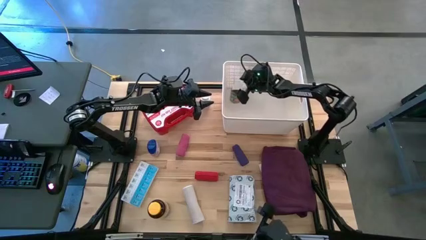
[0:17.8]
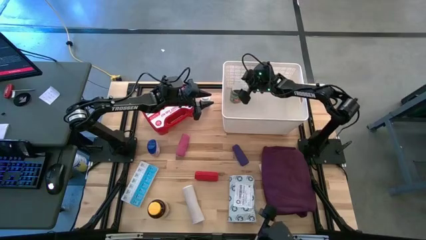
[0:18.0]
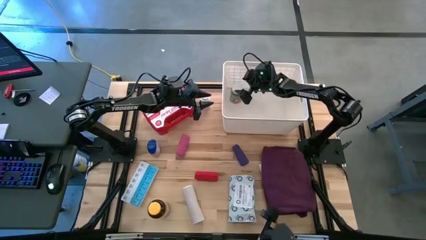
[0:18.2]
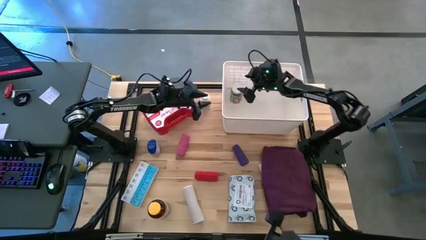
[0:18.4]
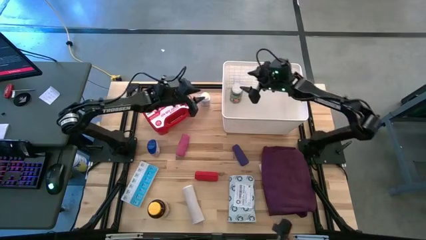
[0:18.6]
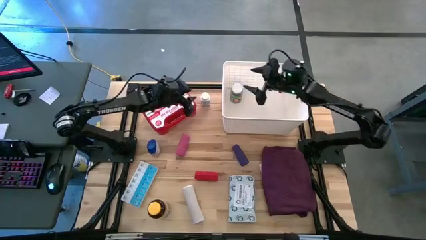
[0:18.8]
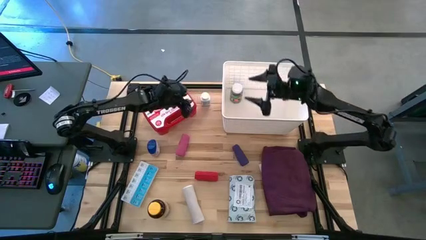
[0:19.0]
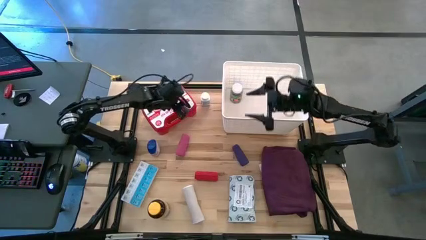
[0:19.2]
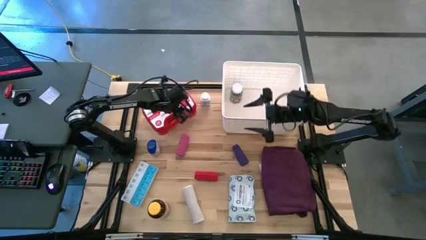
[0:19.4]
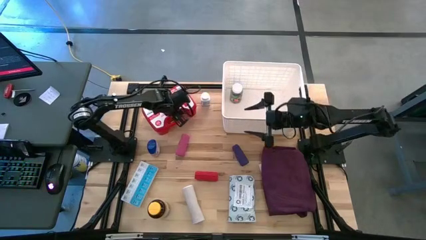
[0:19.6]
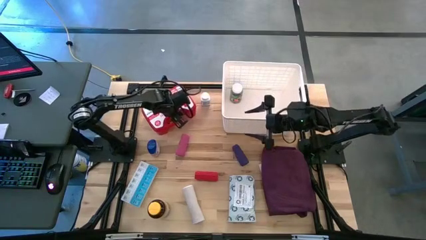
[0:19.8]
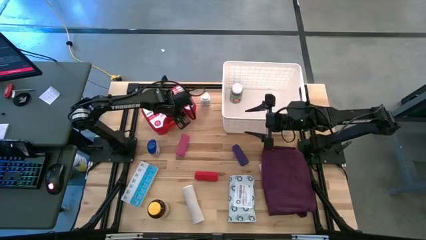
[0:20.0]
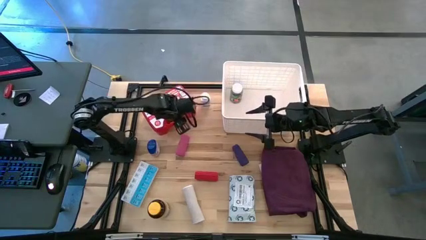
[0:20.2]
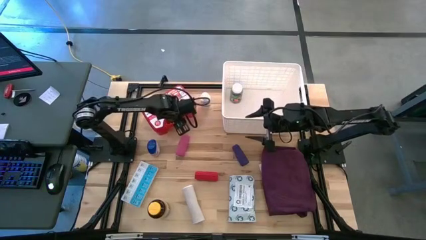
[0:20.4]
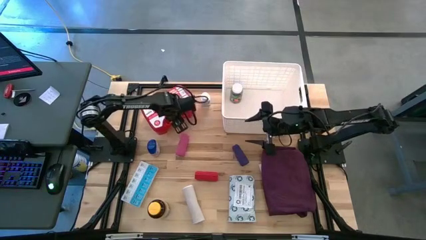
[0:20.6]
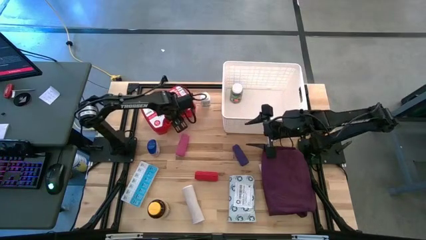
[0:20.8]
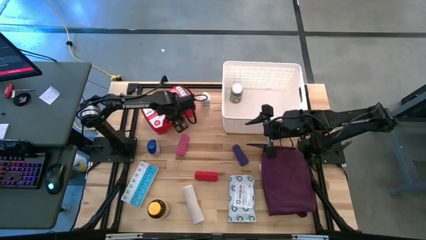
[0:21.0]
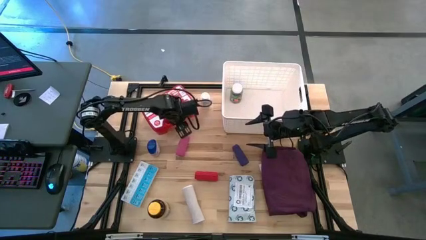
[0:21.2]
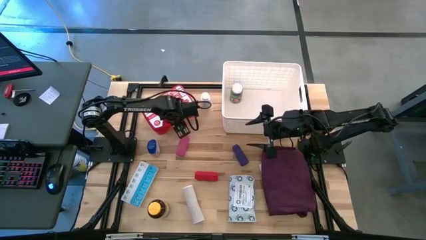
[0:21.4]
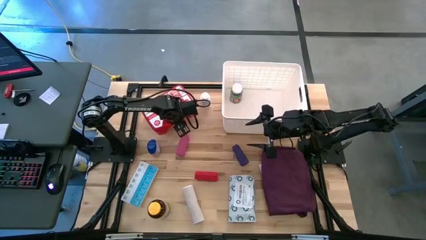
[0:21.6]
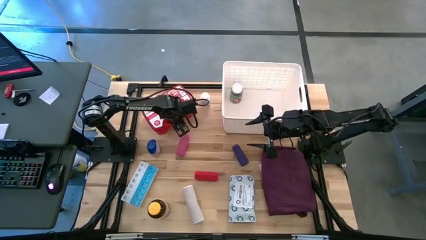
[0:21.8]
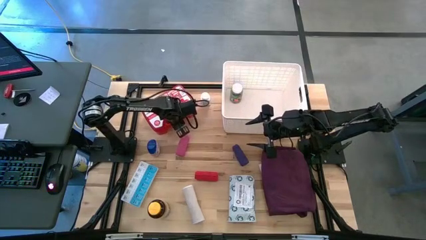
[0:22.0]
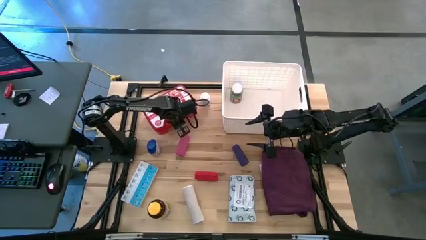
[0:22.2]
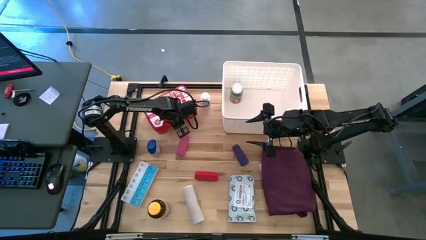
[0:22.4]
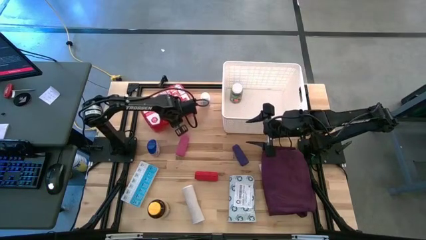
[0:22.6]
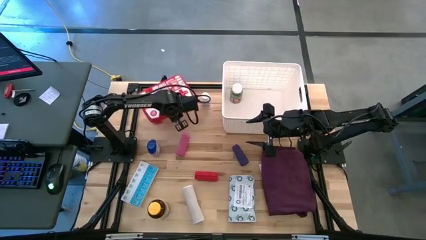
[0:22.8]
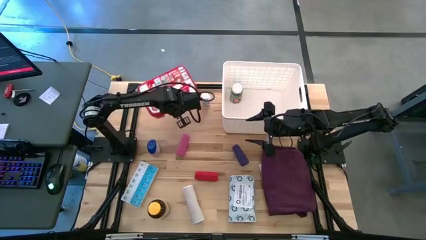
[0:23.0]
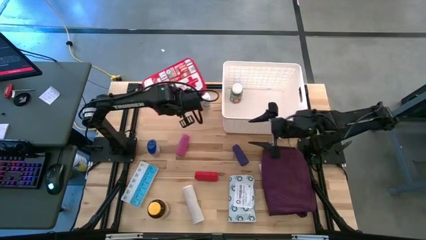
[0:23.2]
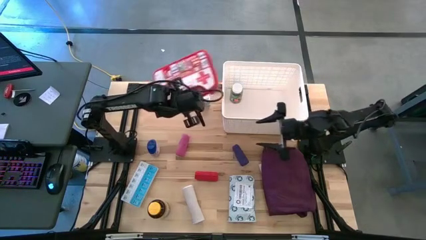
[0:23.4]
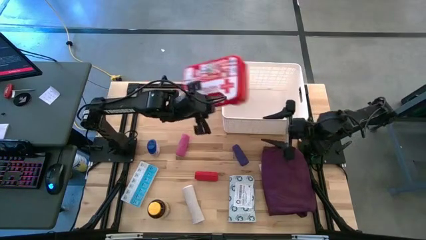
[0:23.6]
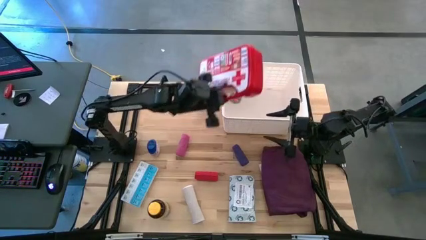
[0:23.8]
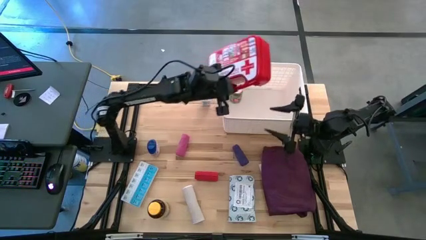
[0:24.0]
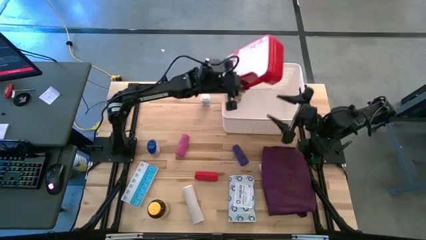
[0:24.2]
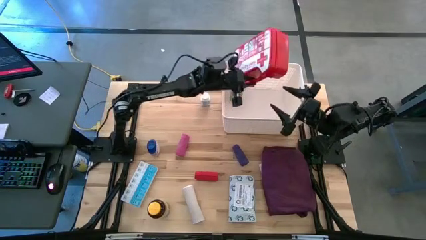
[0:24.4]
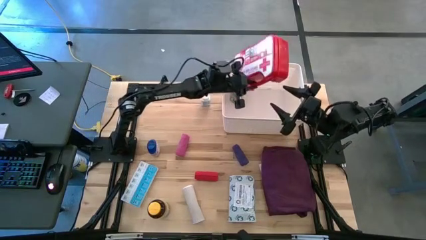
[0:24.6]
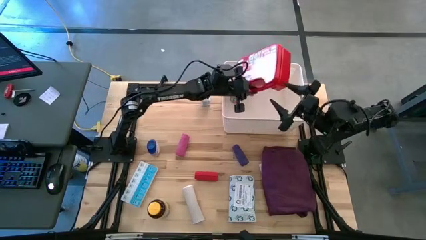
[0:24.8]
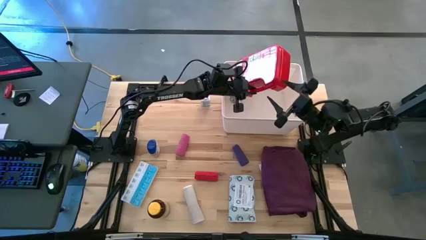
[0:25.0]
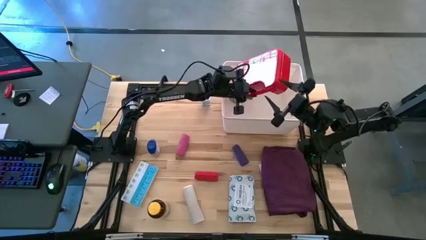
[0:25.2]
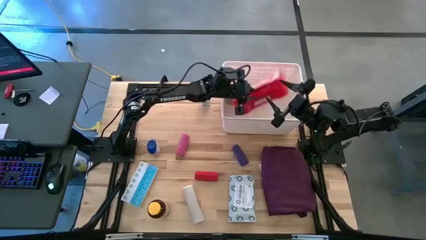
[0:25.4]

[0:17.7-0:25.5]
Task: Pick & place medical supplies in basket/bin
Put the red first aid kit into the white container

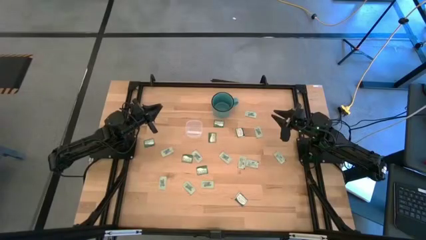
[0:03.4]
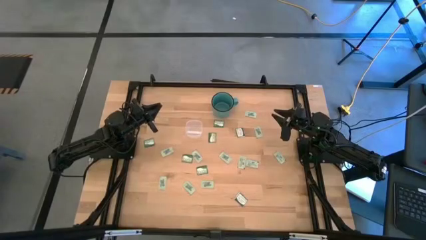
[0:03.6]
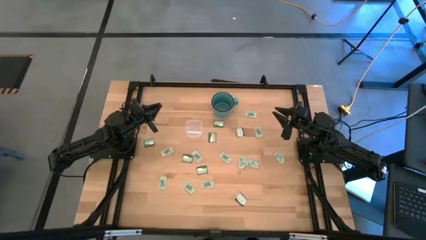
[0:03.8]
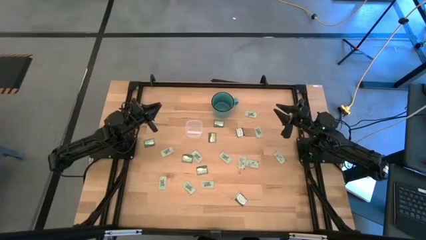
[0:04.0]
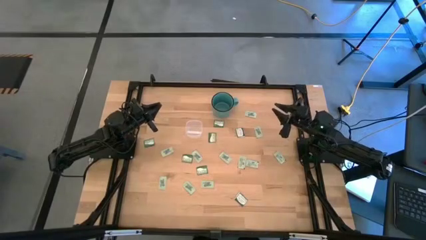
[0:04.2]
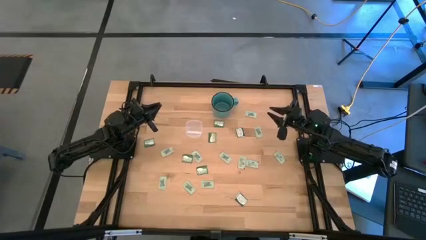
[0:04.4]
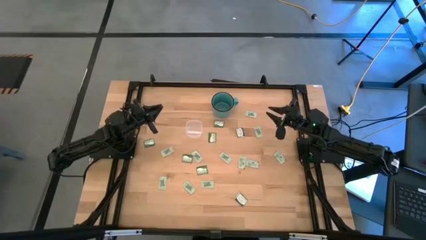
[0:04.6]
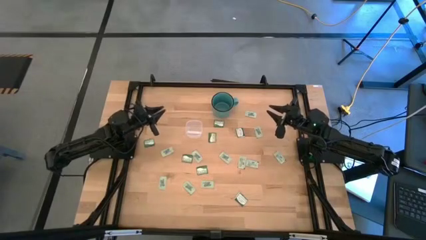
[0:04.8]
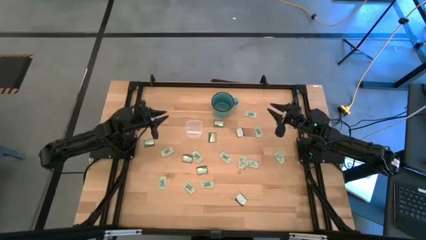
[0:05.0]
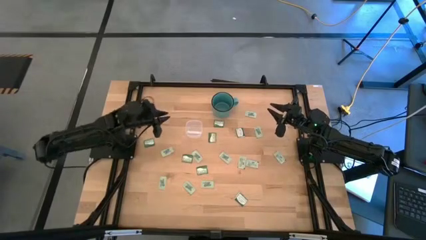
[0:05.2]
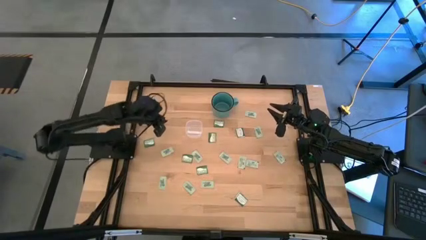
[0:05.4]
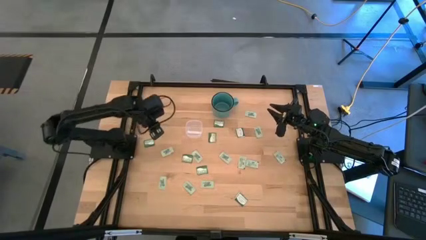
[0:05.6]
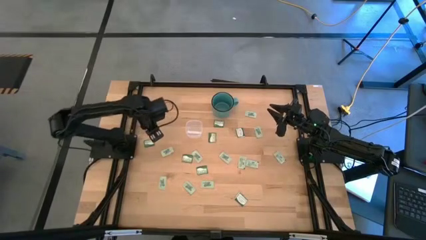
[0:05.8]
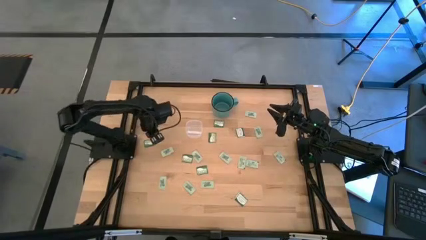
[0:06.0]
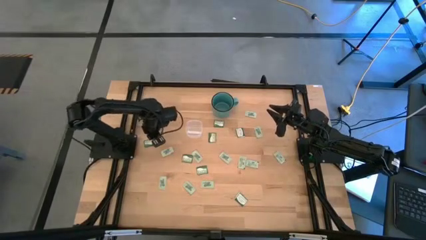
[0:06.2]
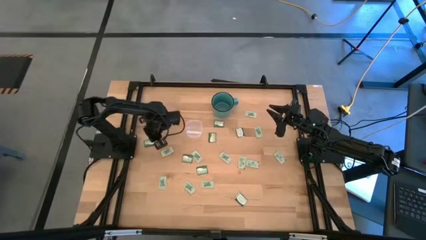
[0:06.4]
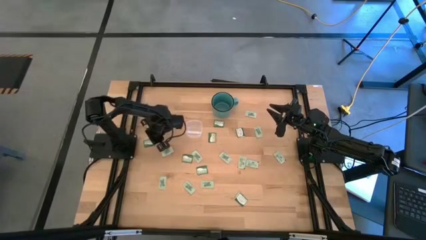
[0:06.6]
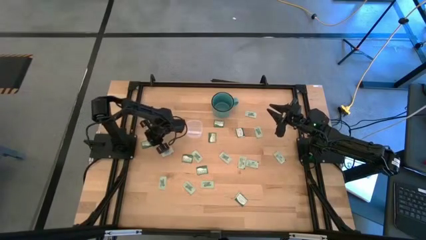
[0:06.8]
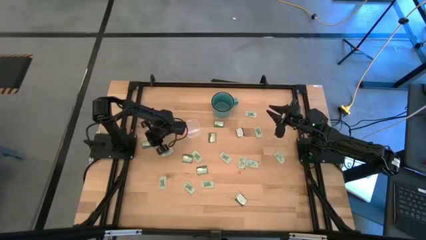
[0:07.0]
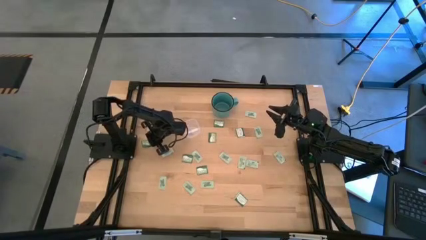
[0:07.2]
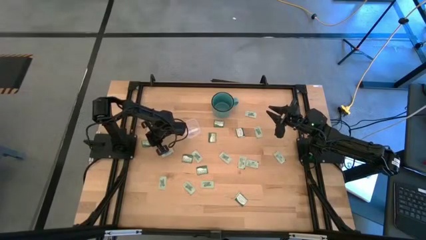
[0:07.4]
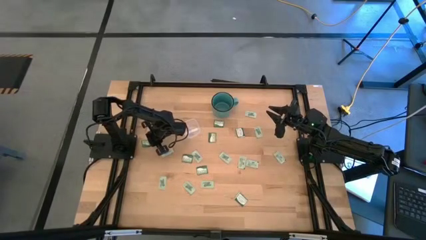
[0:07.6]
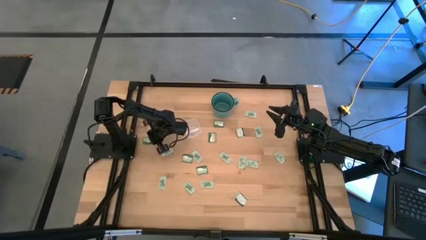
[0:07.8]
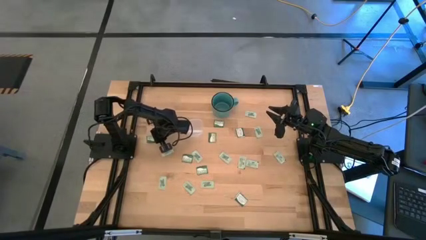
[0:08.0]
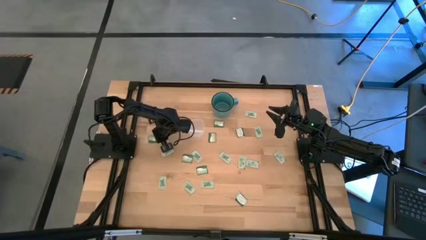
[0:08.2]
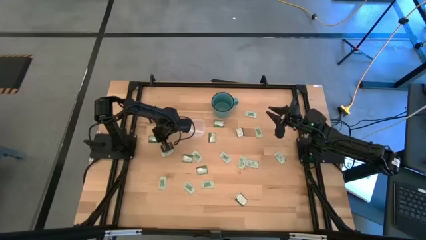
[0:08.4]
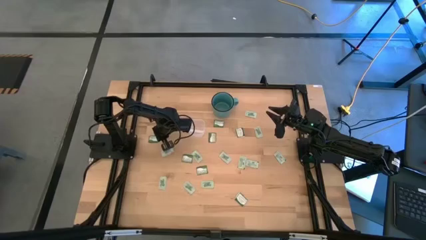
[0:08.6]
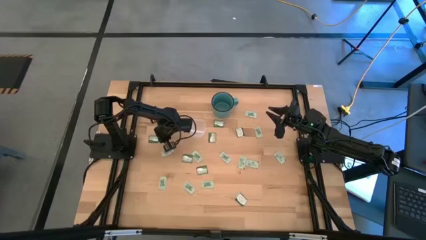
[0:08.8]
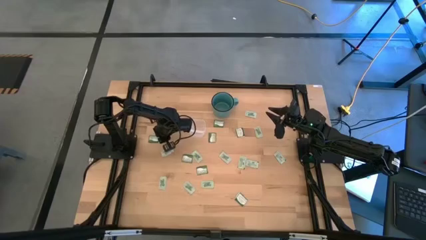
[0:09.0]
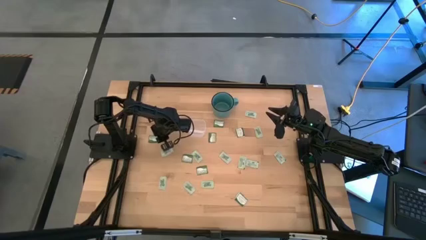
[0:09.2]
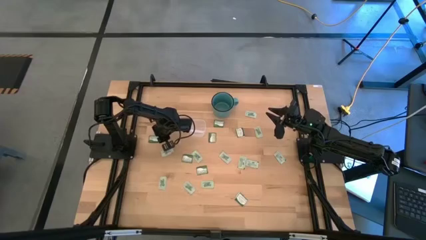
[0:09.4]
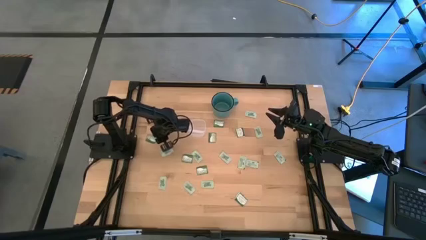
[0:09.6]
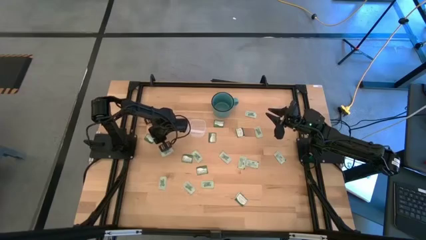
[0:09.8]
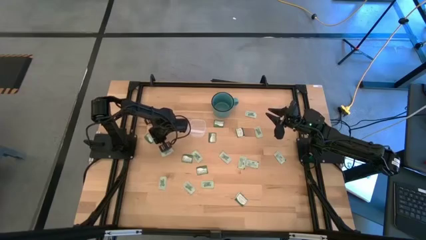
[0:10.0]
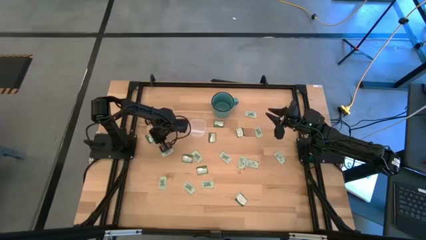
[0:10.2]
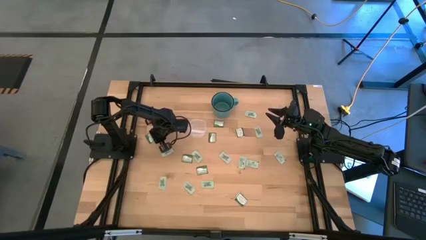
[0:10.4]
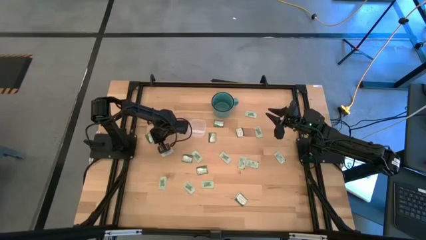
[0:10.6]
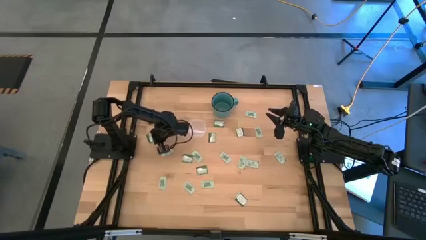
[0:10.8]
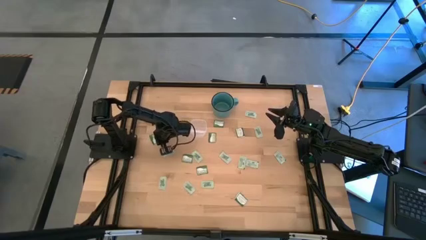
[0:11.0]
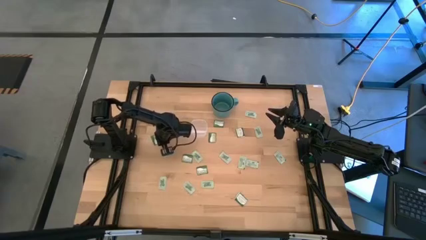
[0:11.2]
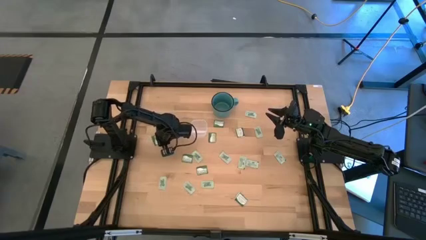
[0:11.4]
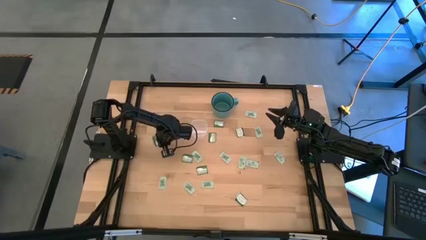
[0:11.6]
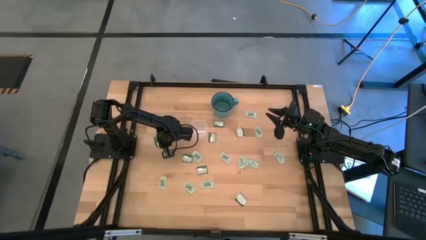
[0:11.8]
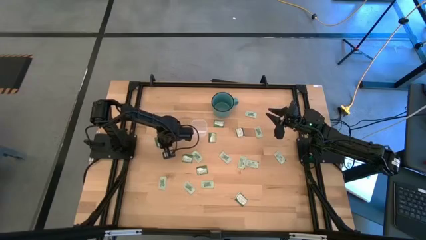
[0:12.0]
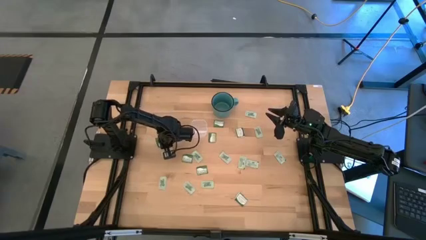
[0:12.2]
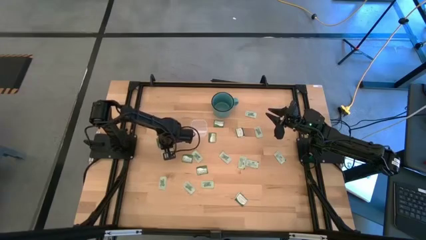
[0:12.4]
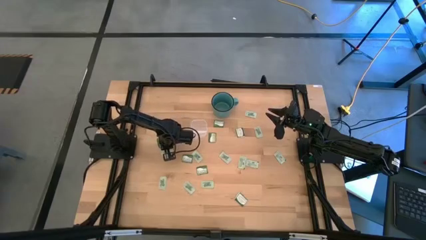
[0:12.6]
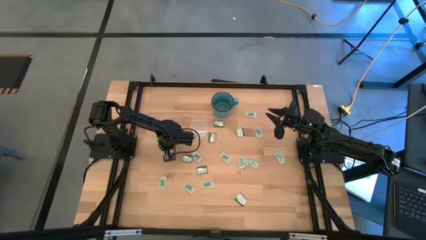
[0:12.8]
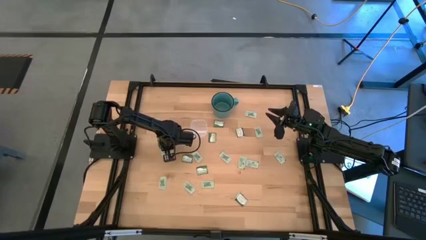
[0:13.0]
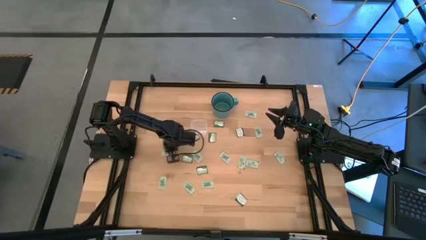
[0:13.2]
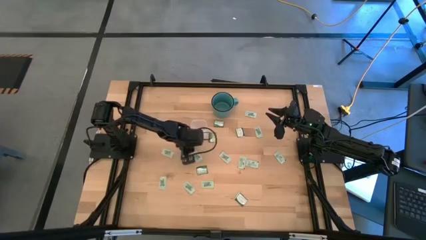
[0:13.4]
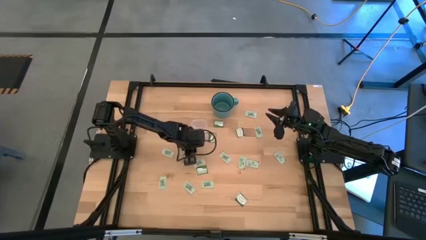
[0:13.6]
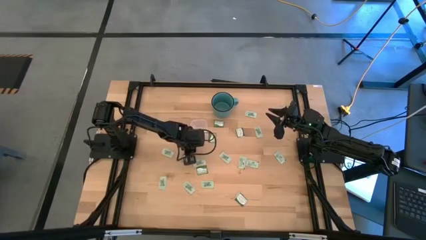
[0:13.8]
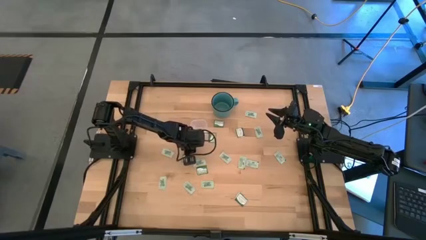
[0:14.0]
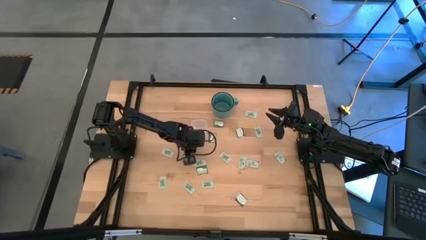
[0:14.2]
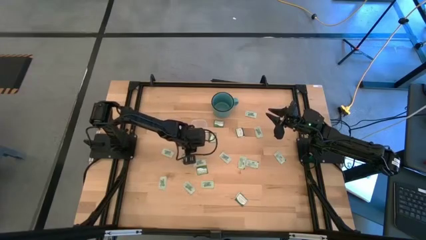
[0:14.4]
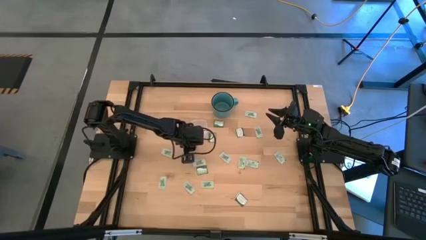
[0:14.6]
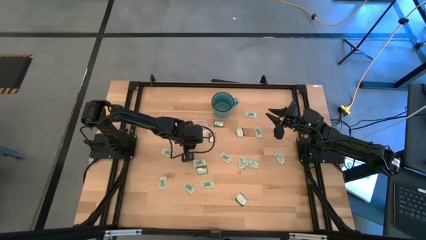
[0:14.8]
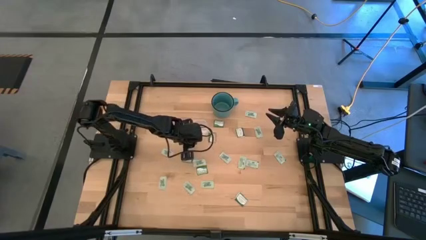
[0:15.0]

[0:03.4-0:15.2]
Task: Pick and place Stevia / Truvia into bins
Put the dark green truvia packet into the transparent container
